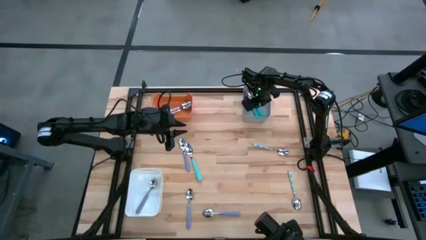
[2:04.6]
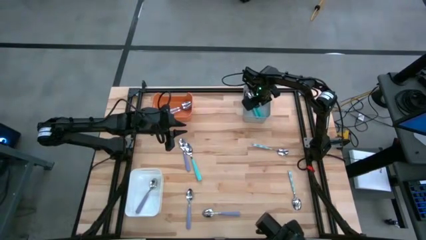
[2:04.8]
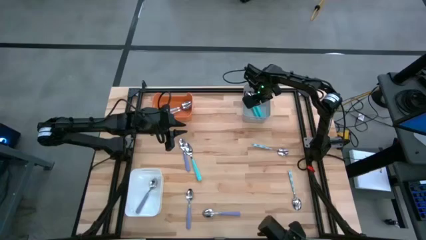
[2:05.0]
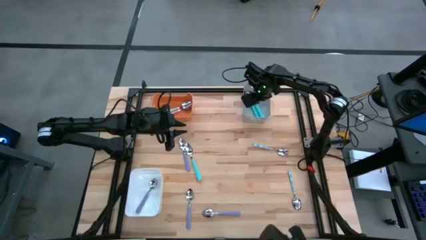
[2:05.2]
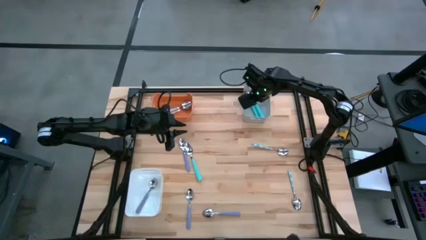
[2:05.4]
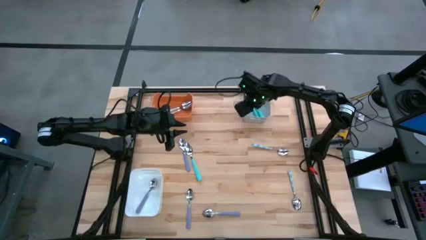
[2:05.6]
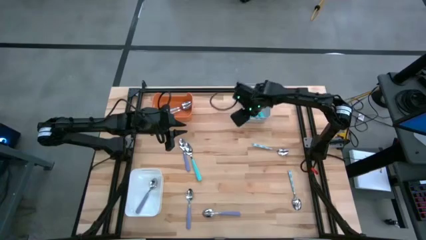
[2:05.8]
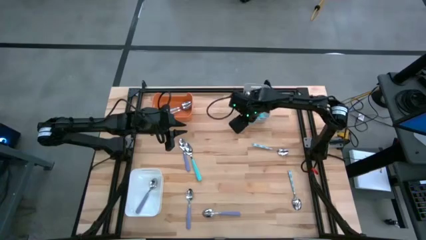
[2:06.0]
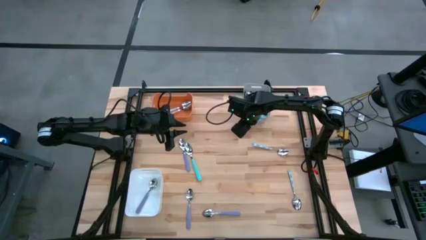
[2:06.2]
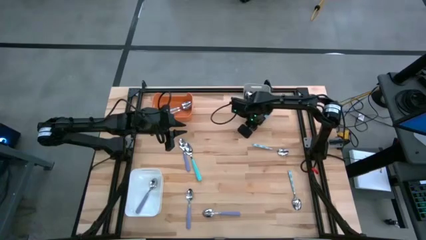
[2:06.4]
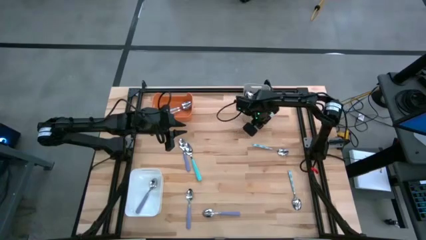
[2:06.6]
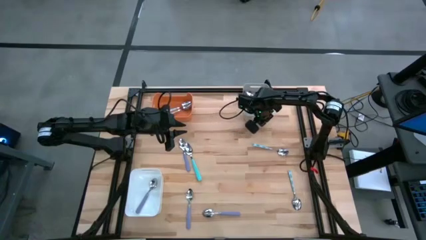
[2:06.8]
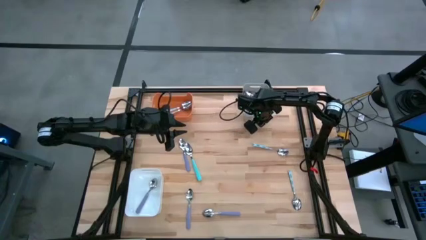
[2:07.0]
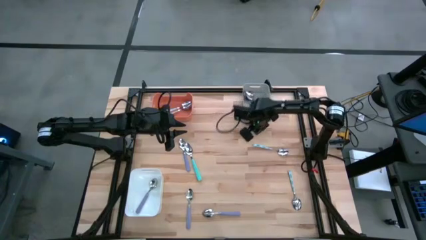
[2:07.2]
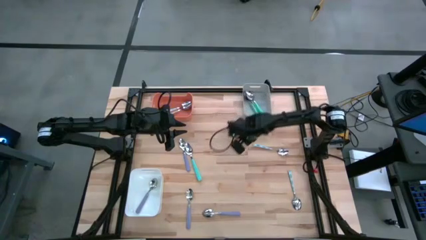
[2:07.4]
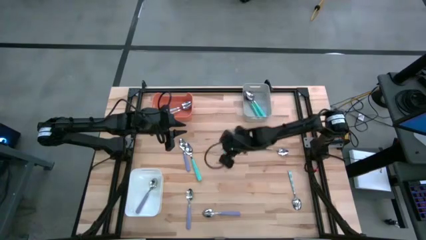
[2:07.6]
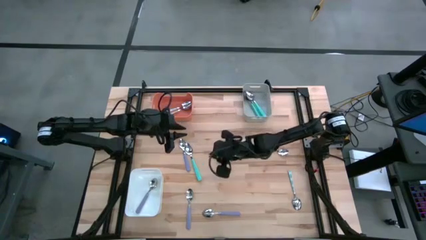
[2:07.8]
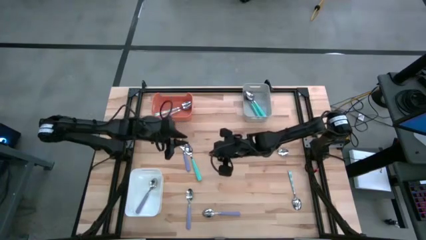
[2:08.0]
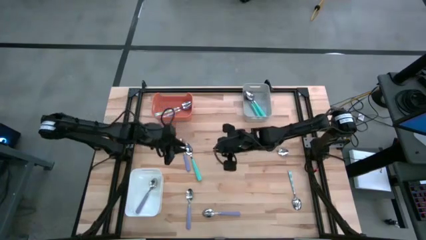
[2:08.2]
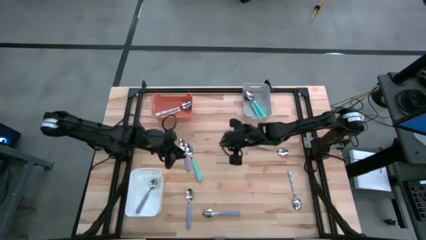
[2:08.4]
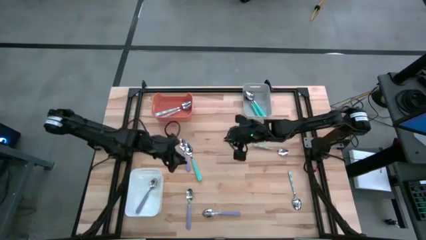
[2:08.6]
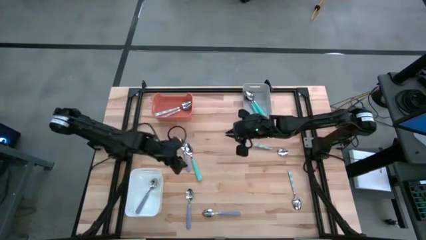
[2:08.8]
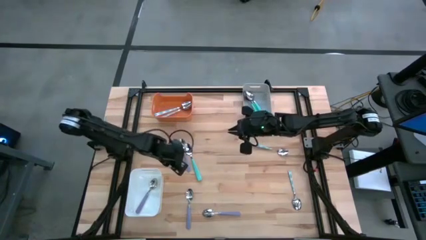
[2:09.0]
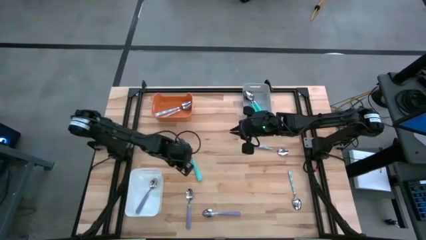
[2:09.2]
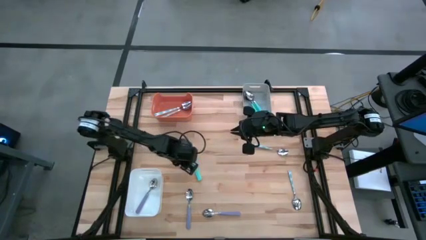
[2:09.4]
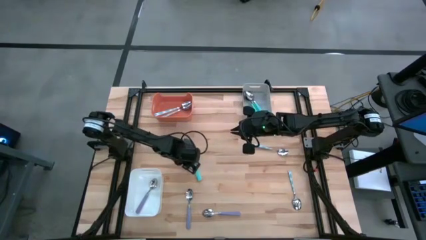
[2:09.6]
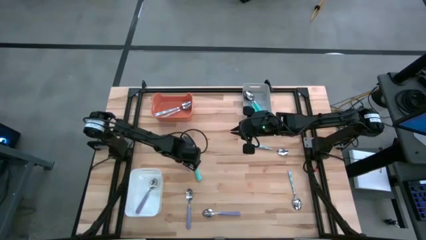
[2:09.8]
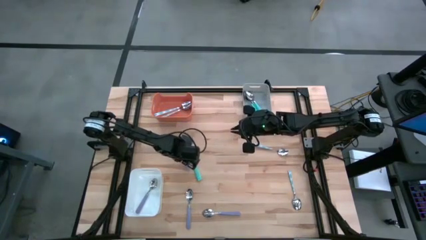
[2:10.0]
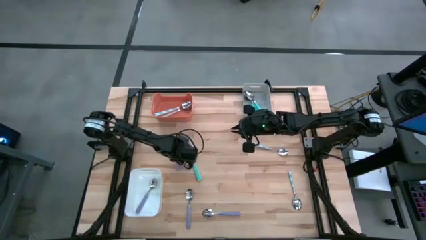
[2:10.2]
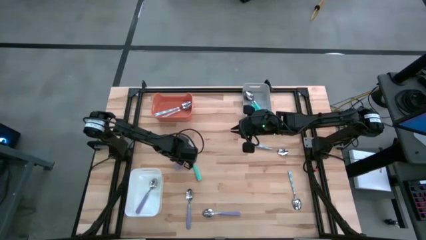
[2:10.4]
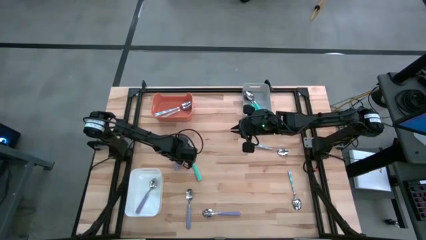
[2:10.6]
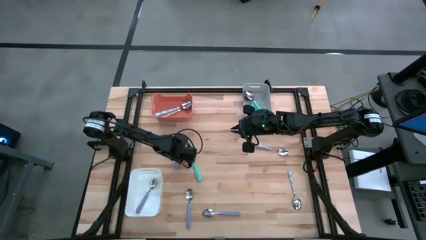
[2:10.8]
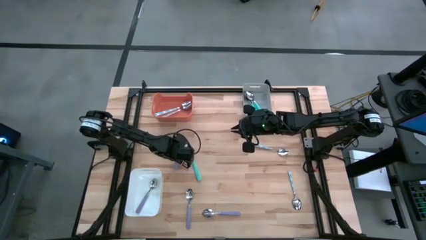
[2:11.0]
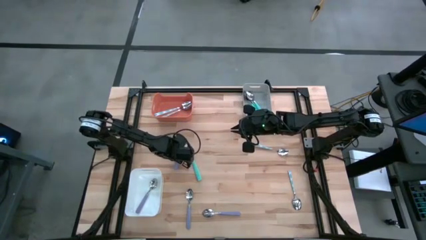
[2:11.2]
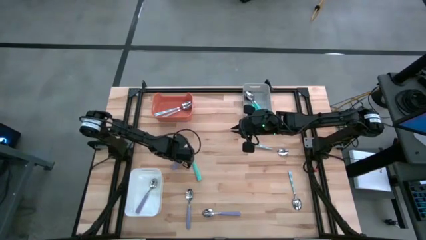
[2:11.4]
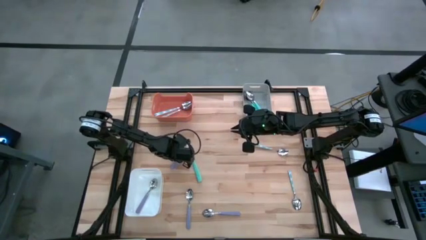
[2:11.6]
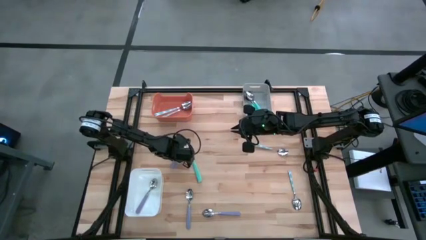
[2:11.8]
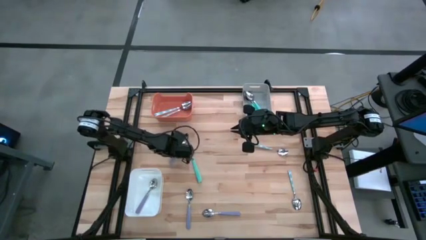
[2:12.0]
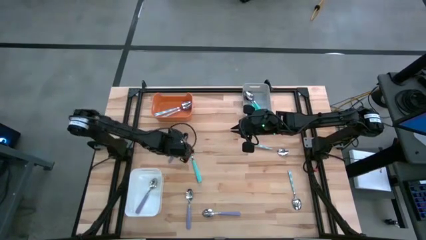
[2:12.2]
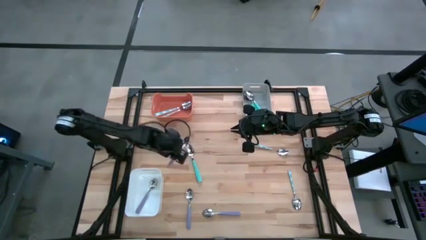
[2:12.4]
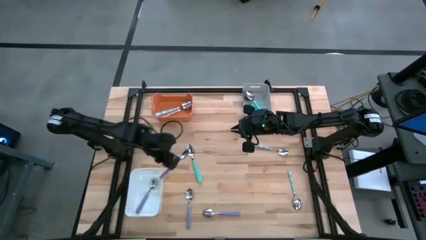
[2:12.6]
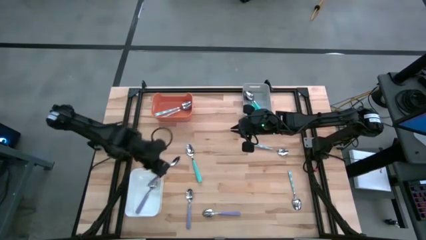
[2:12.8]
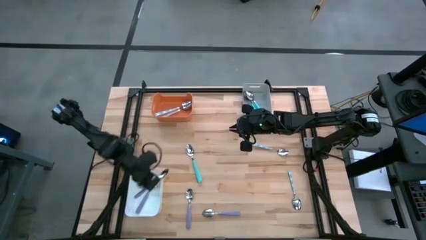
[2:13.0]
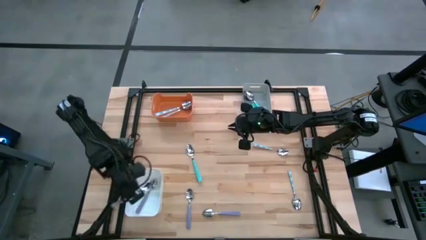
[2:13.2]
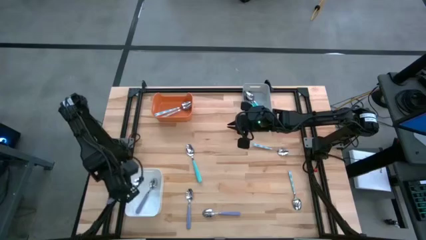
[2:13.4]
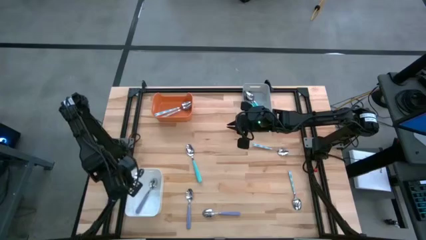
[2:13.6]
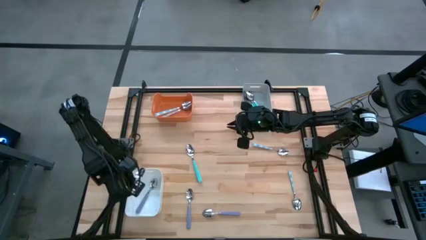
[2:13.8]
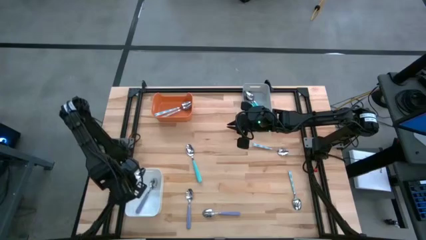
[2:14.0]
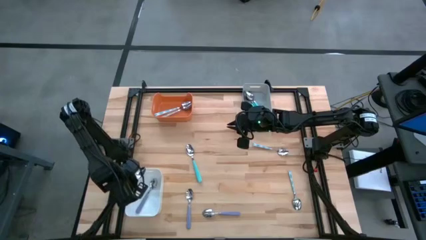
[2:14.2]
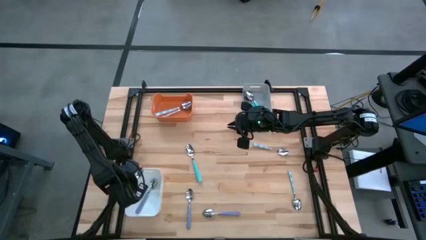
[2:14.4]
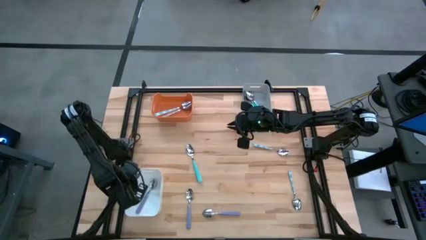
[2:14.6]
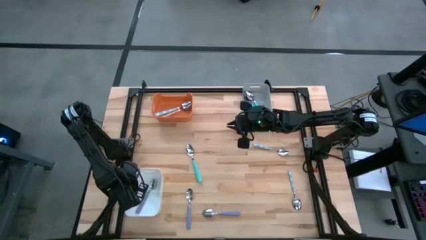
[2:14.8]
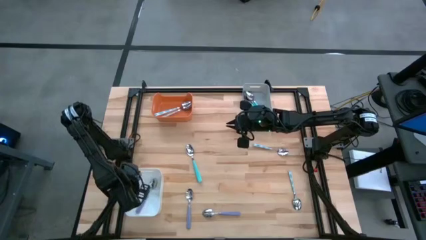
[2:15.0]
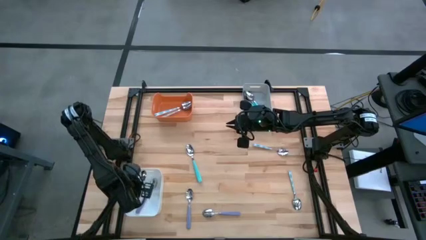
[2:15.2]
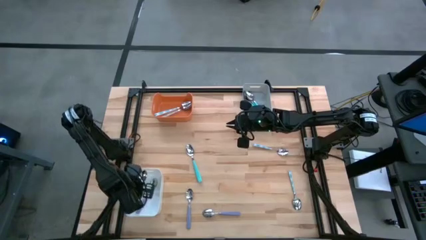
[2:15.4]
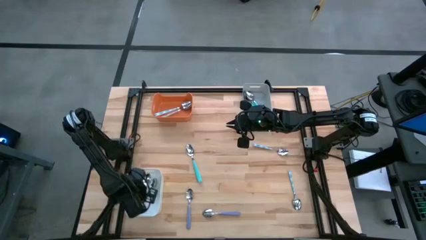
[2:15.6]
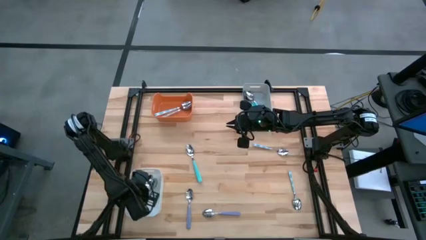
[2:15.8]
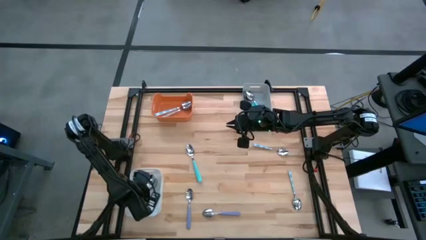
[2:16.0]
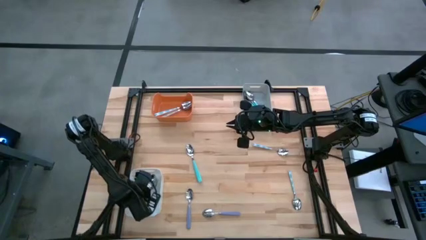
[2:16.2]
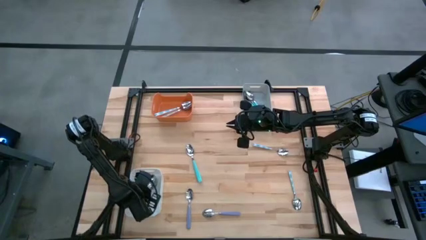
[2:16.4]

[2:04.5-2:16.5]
Task: Sort silverware by color (type)
Put the top purple spoon into the white bin

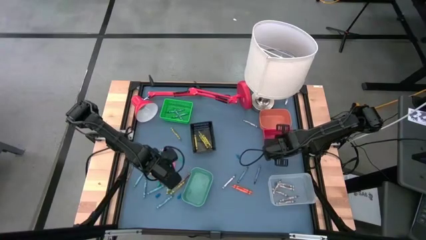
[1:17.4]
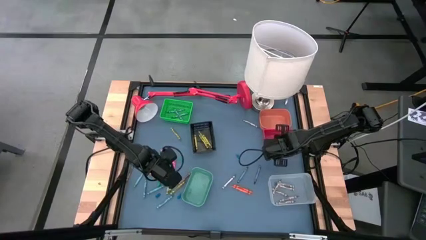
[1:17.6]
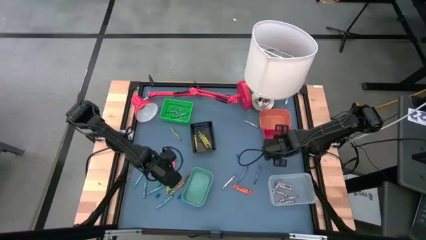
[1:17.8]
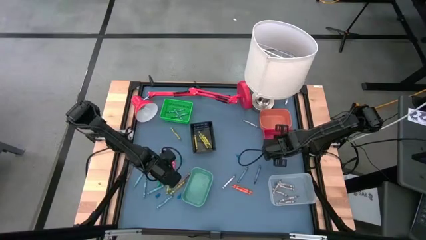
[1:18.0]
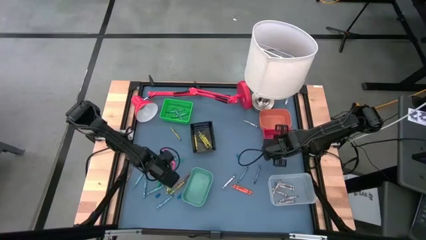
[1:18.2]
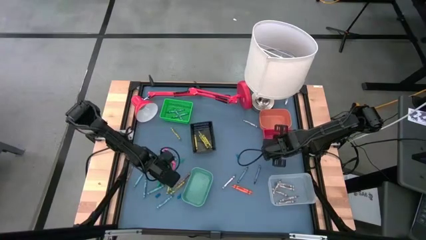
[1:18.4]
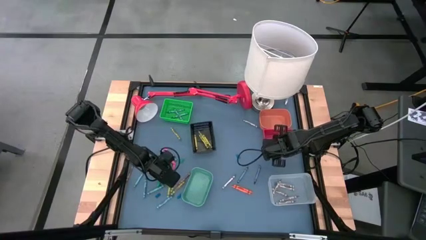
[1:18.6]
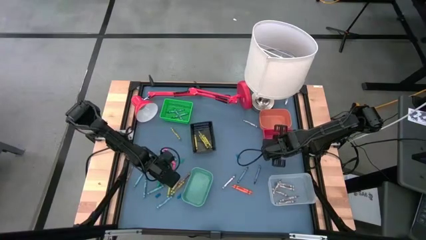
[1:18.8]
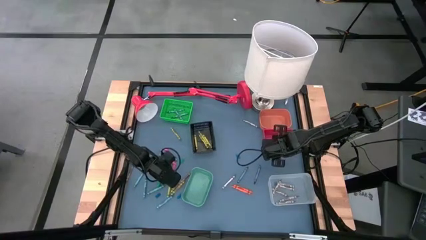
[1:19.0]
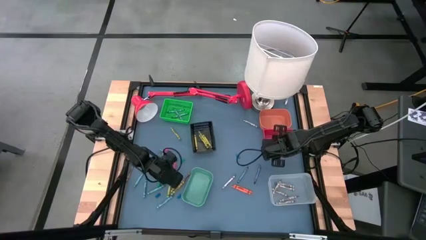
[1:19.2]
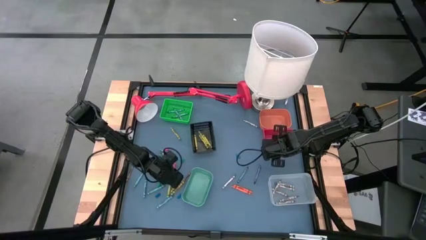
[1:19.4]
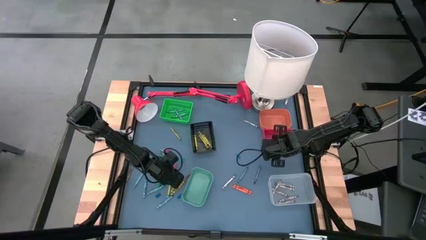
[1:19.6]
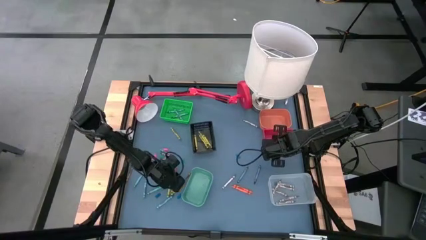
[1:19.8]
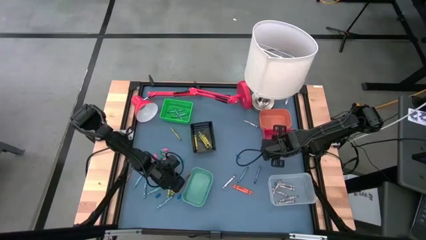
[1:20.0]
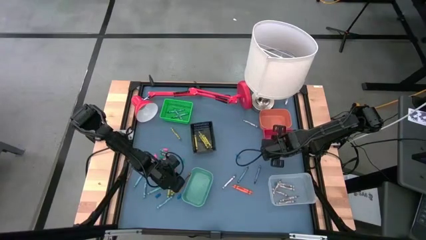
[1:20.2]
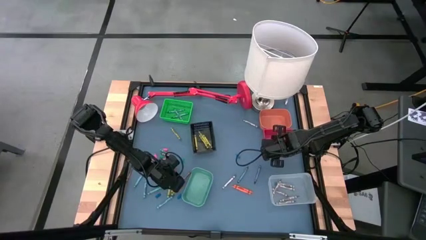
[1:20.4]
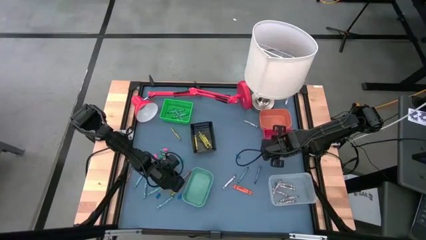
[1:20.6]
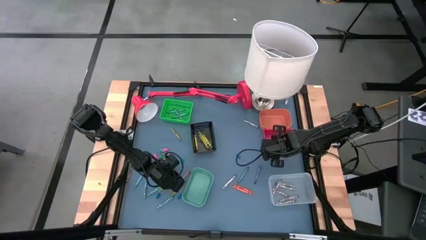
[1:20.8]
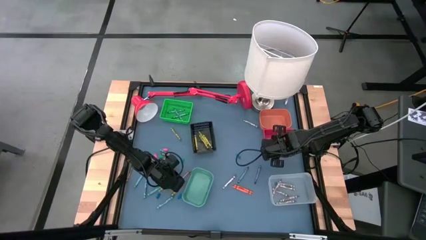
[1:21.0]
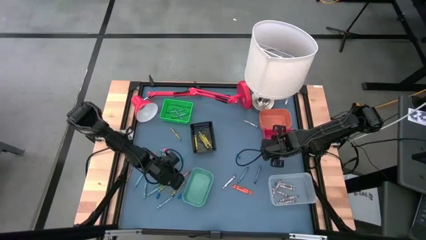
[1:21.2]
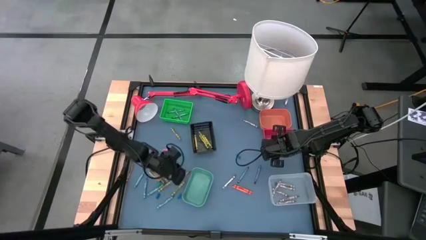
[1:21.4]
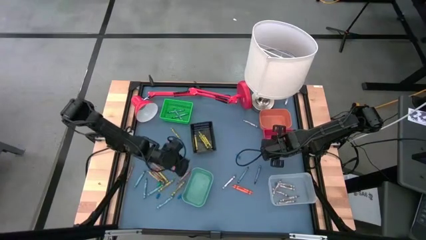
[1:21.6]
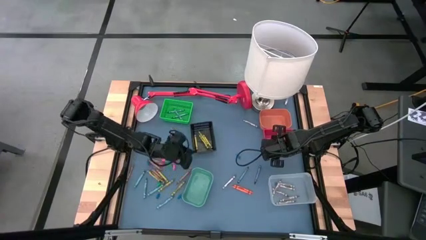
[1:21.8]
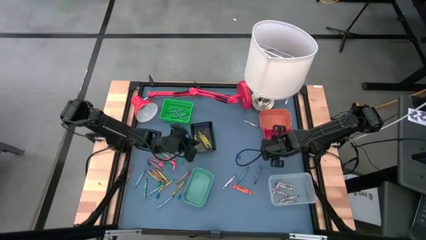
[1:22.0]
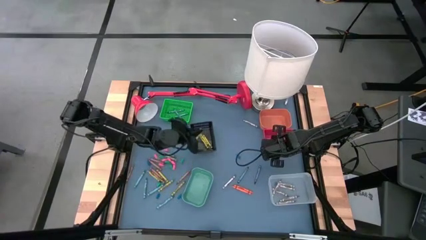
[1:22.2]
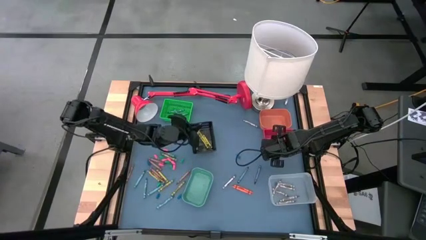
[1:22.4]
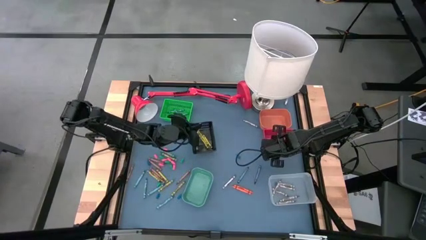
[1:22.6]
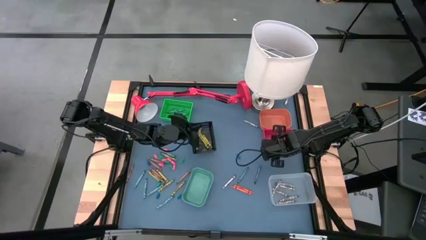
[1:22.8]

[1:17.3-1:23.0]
Task: Sort crayons
Put the green crayon into the black bin
